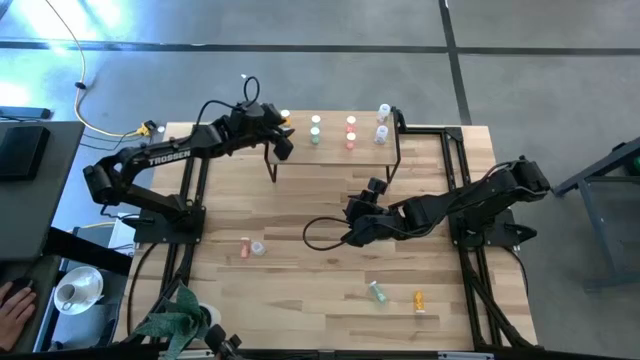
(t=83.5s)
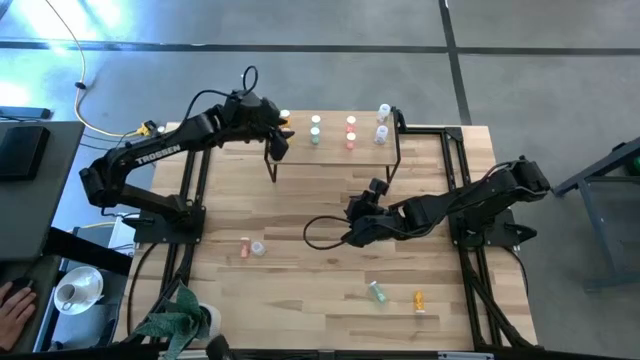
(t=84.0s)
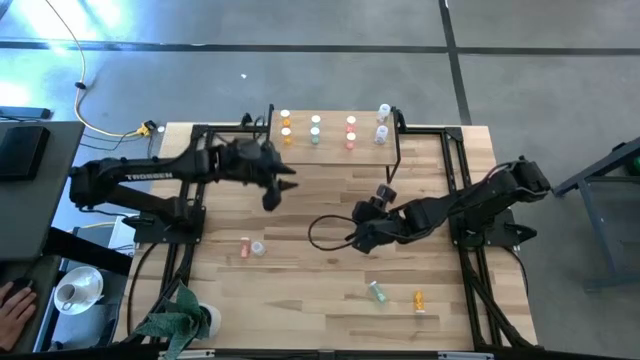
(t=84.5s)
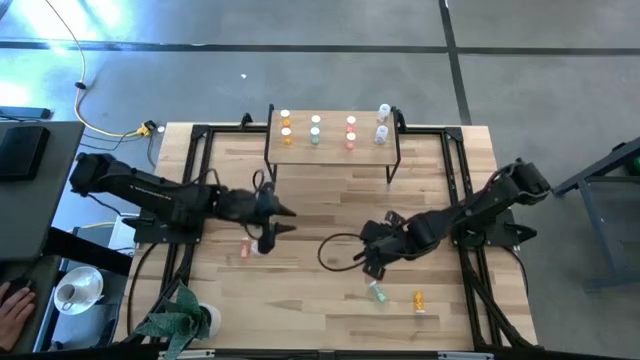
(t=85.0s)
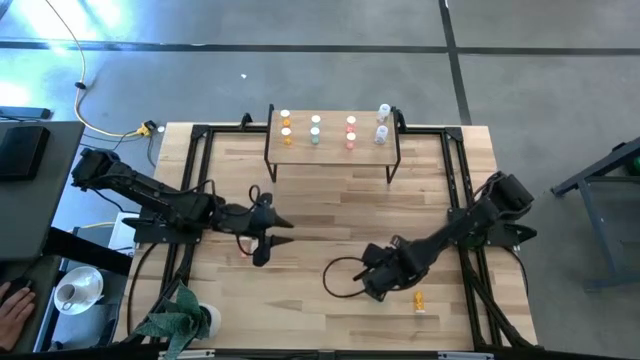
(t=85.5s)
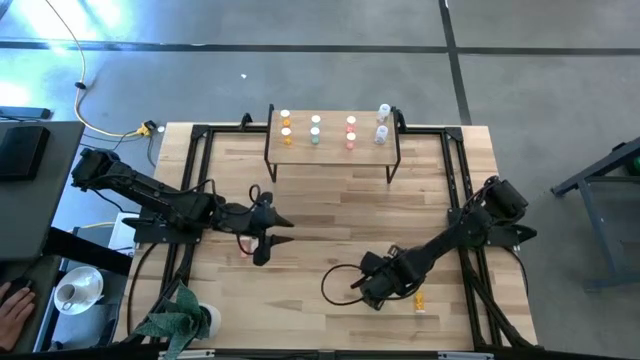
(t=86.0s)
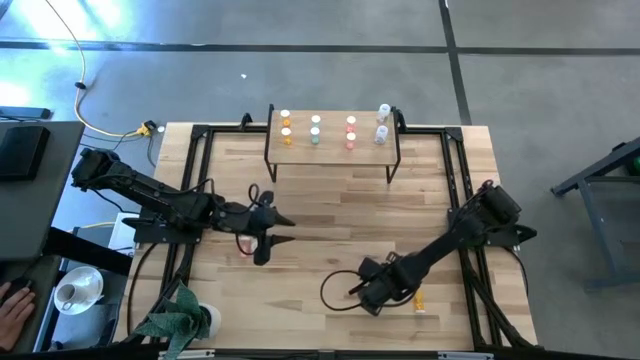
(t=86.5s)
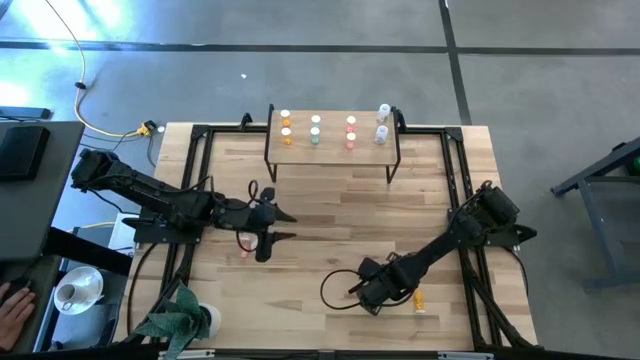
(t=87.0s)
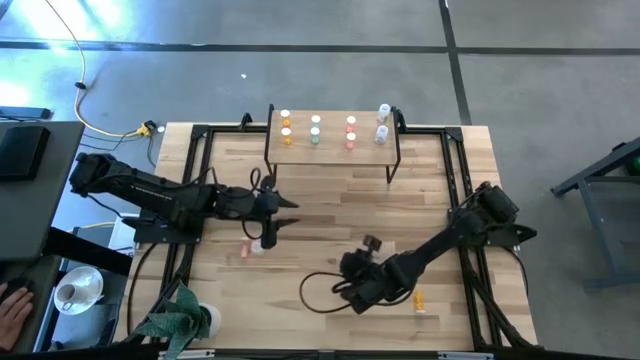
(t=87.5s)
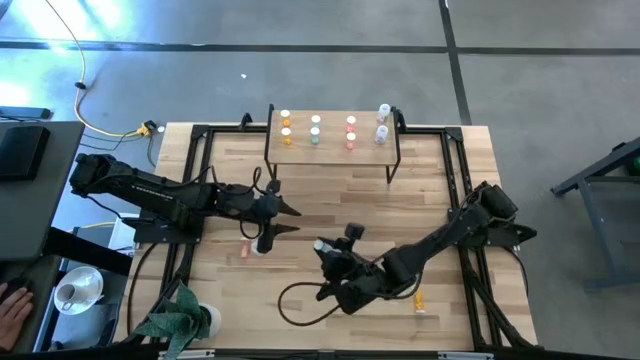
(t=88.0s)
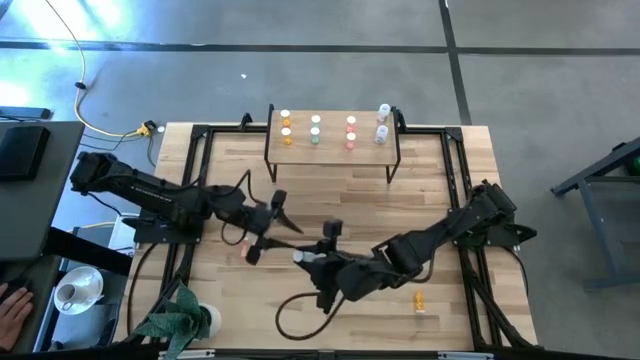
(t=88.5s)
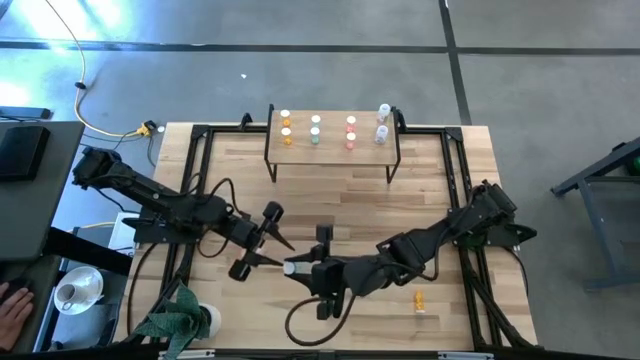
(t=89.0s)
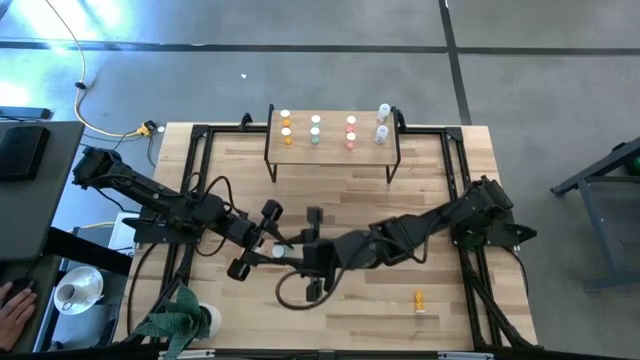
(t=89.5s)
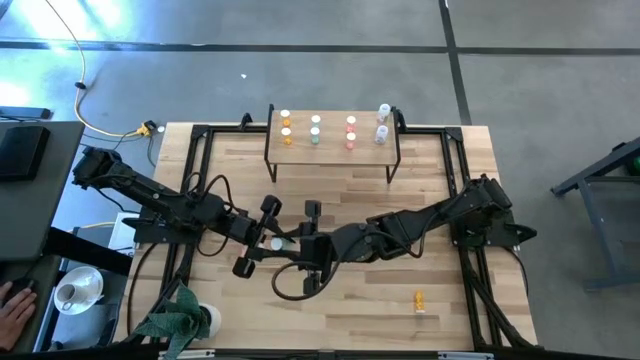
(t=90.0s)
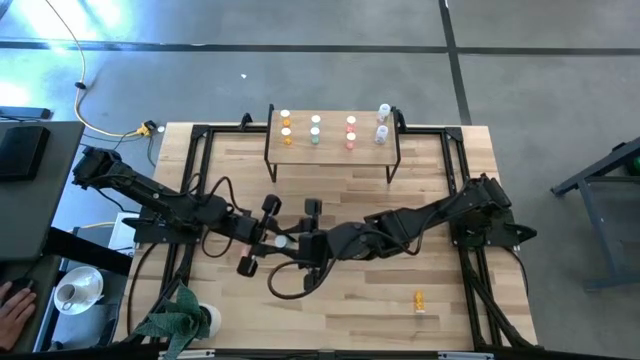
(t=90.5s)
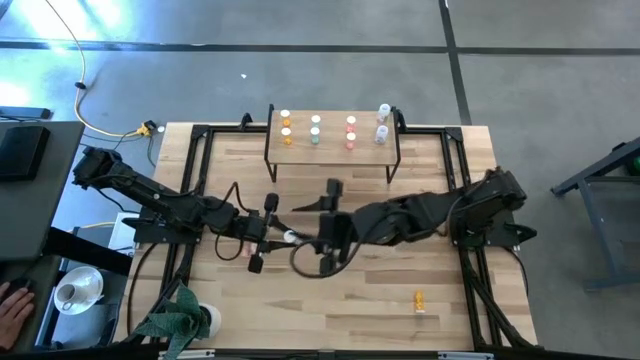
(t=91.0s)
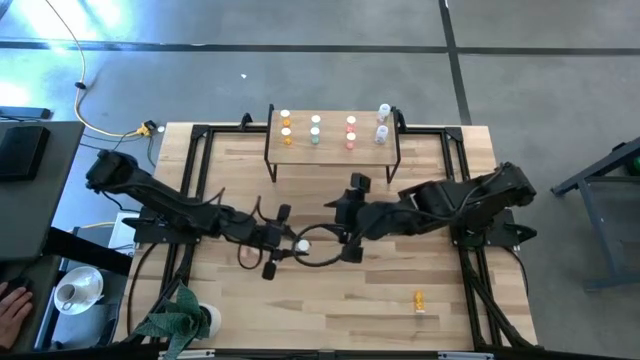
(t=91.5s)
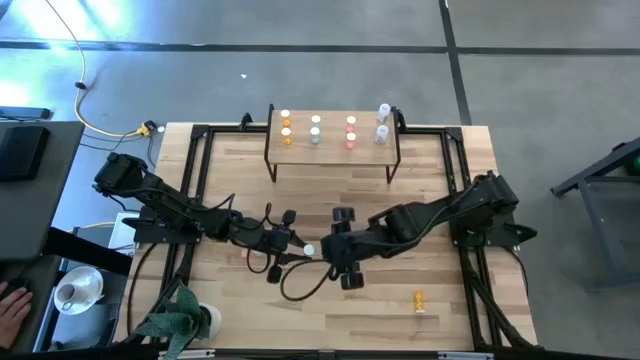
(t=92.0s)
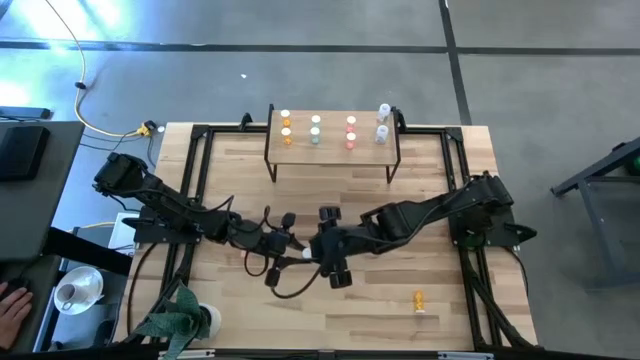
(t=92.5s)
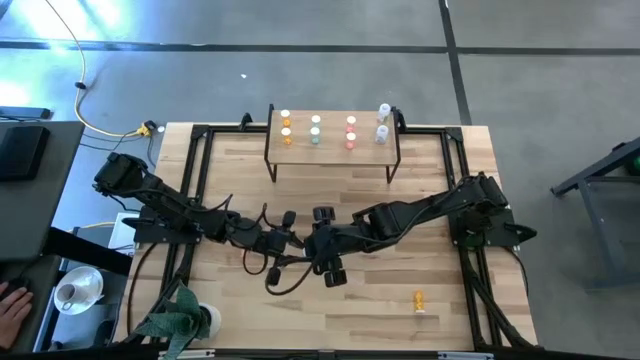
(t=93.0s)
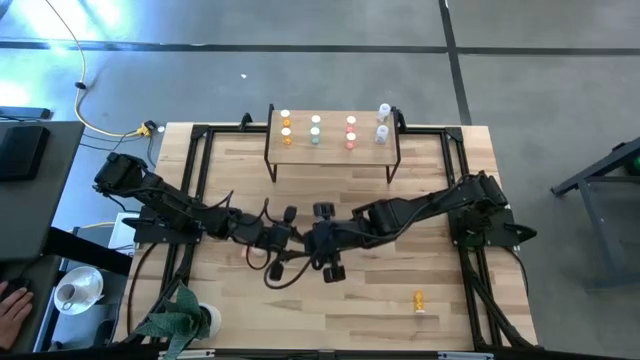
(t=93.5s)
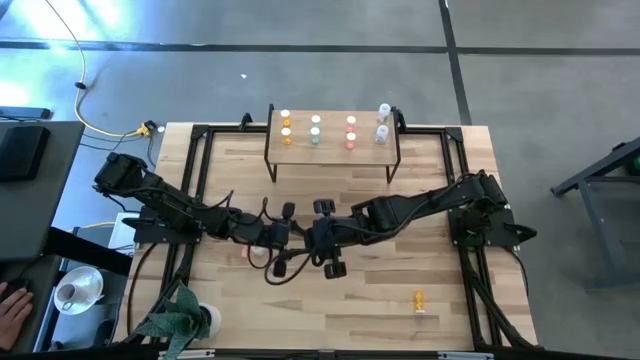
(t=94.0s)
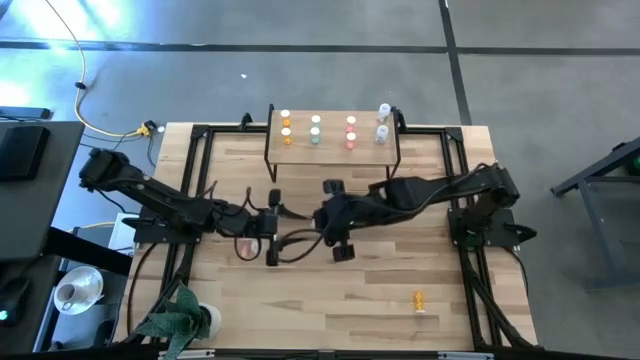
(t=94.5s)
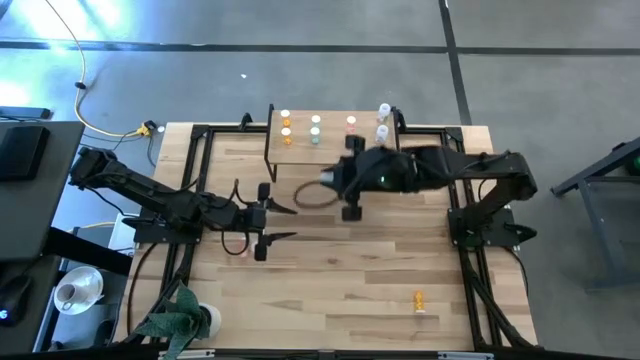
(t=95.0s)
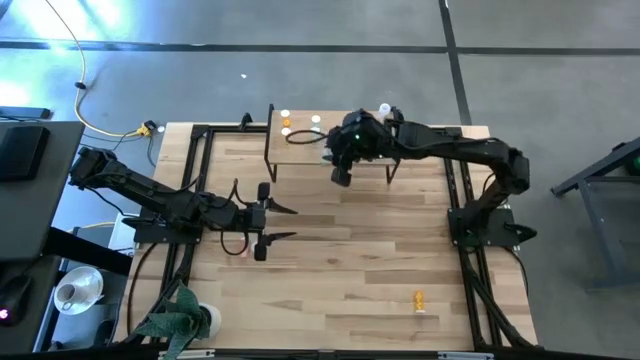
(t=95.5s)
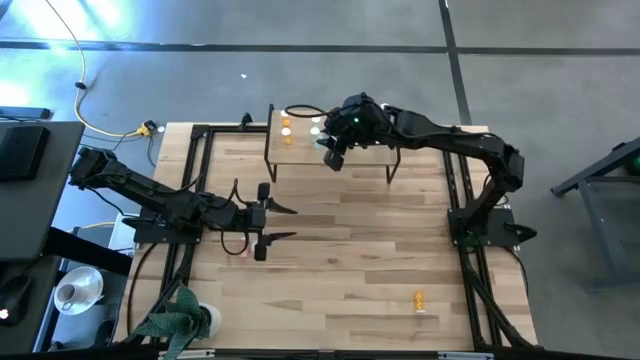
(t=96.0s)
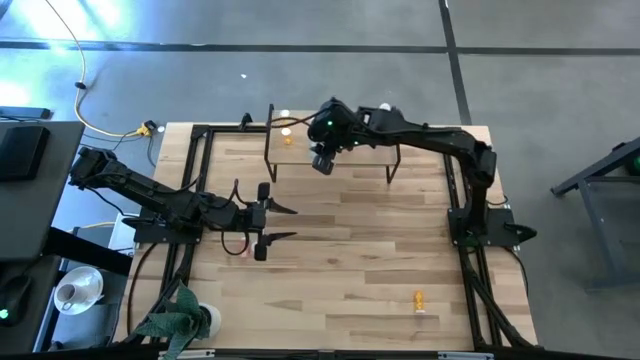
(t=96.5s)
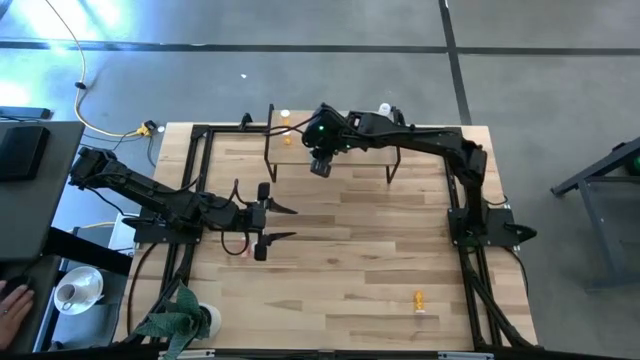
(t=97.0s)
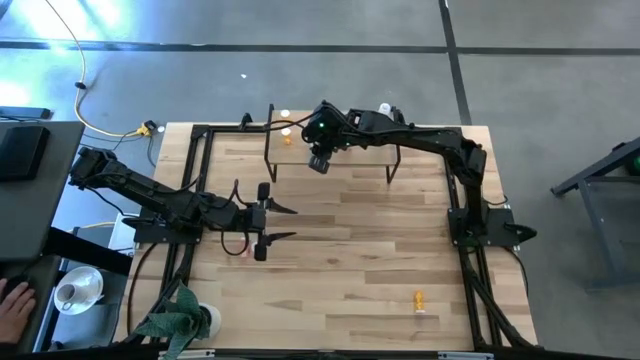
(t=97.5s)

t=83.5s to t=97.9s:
Task: Pick and place medicine bottles onto shelf by color
Put the blue pill bottle on the shelf

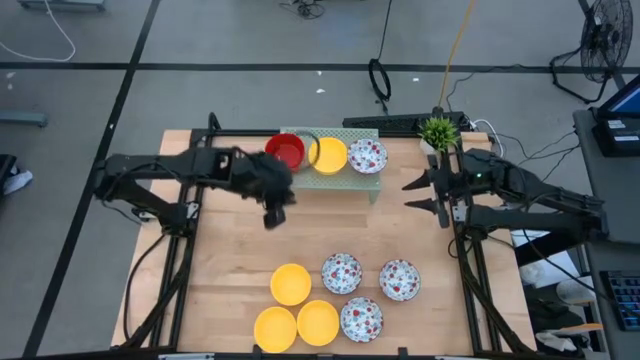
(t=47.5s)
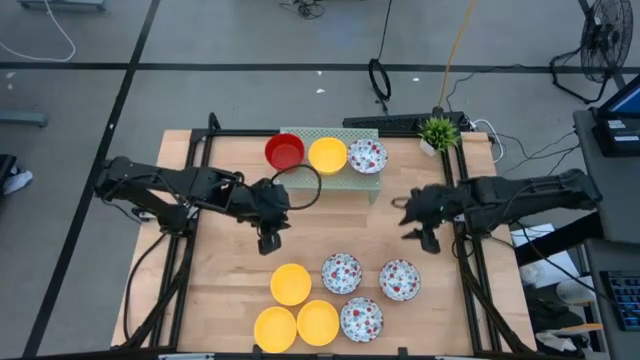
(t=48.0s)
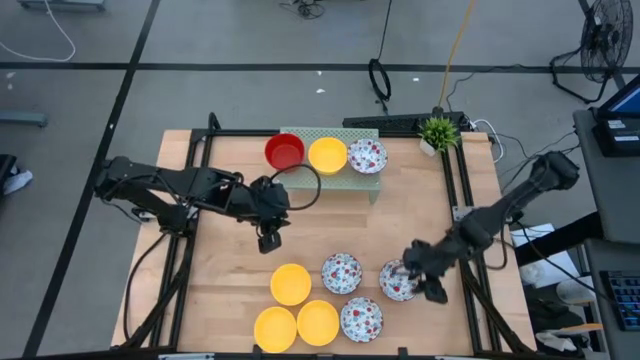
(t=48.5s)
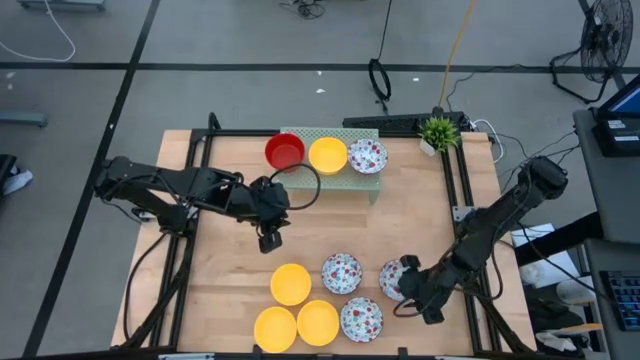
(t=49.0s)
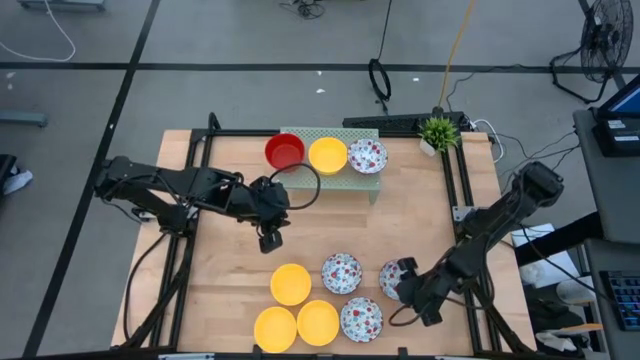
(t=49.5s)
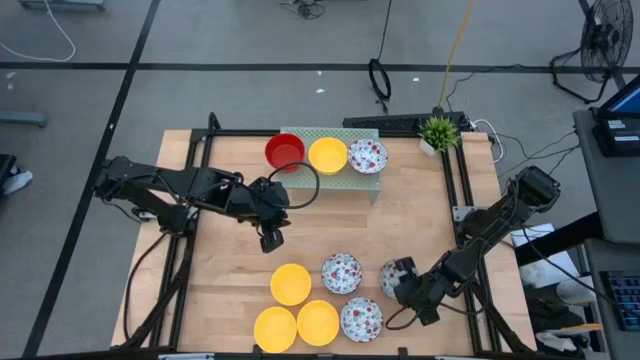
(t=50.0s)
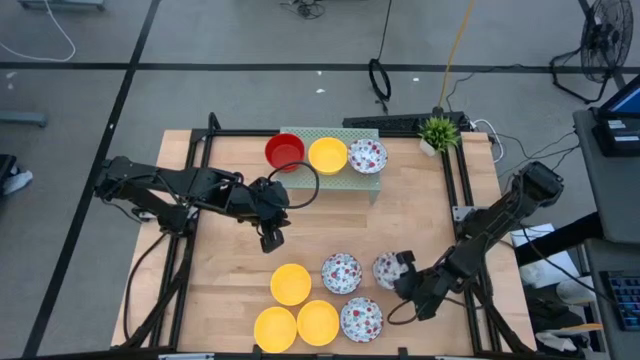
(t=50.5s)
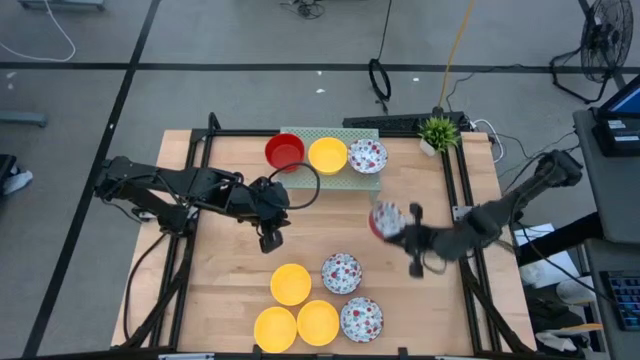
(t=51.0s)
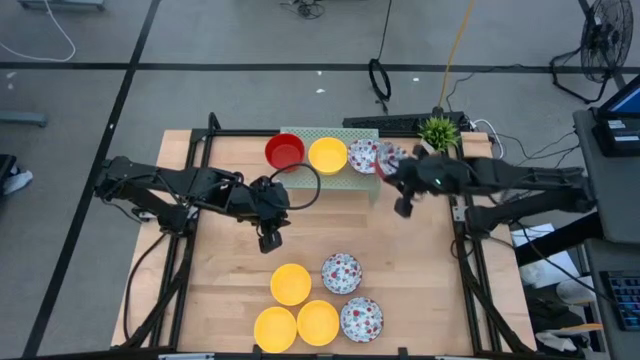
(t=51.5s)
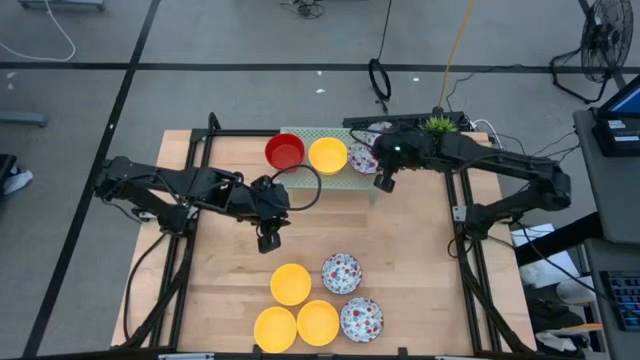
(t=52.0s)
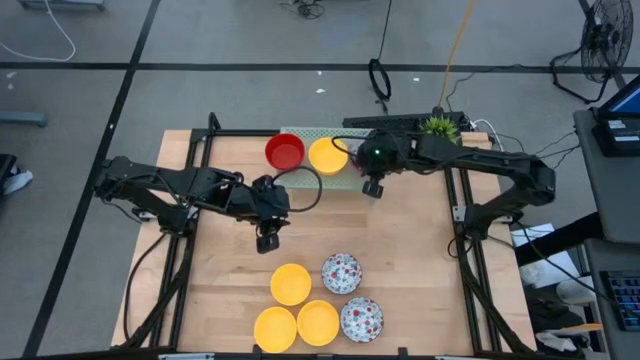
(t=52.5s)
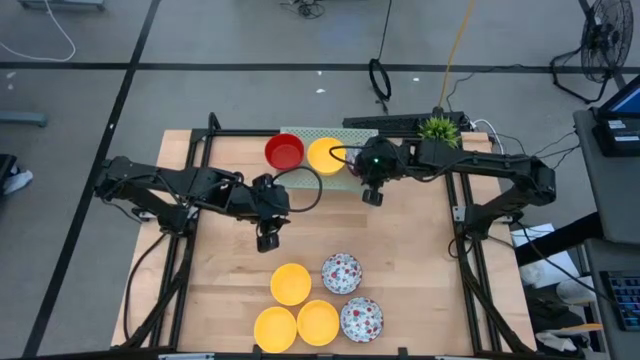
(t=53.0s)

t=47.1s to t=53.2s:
Task: Pick & Place Mini bowls
Stack the white patterned bowl on the white patterned bowl on the shelf
